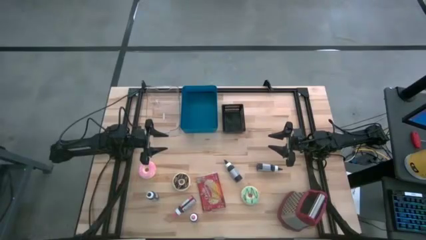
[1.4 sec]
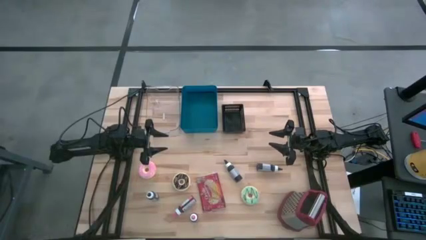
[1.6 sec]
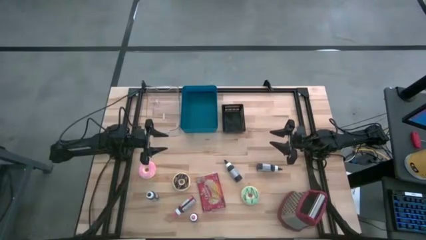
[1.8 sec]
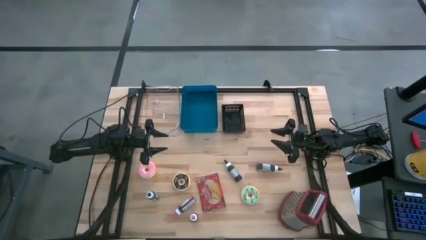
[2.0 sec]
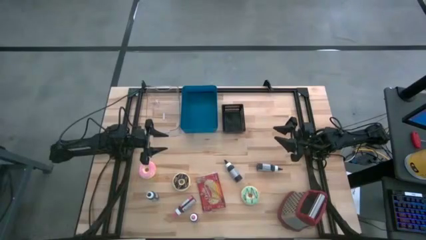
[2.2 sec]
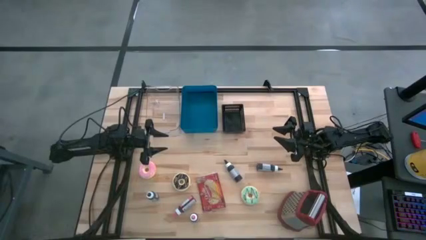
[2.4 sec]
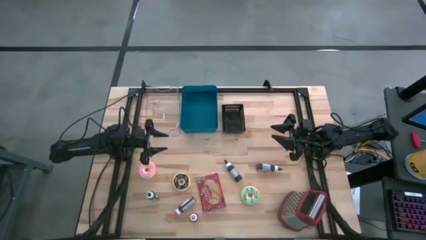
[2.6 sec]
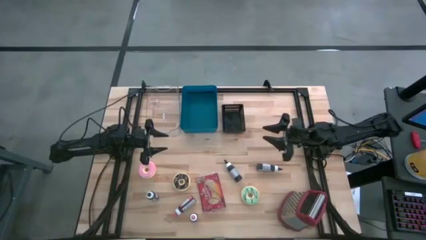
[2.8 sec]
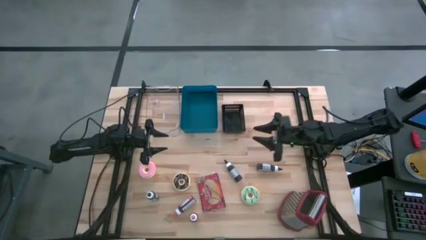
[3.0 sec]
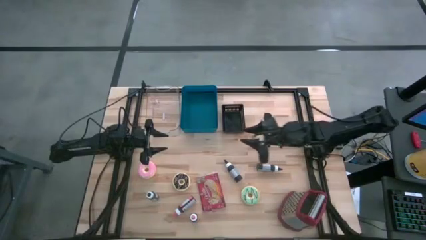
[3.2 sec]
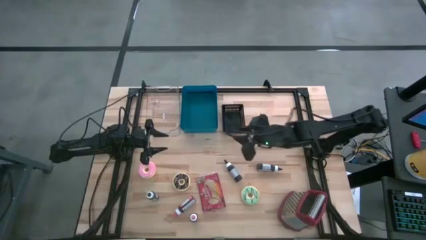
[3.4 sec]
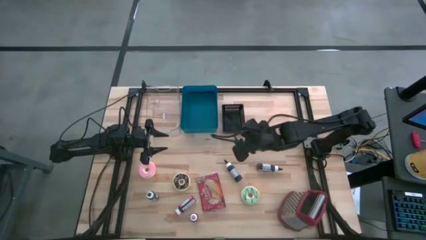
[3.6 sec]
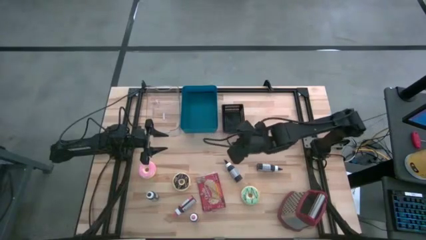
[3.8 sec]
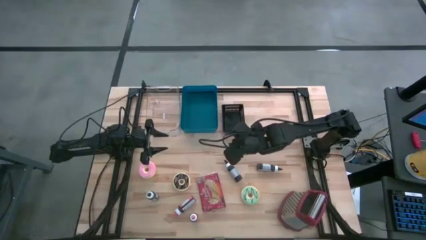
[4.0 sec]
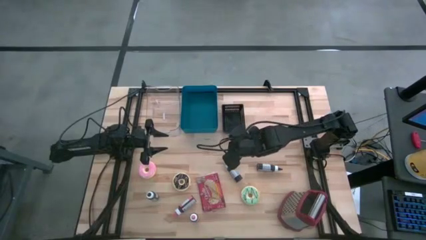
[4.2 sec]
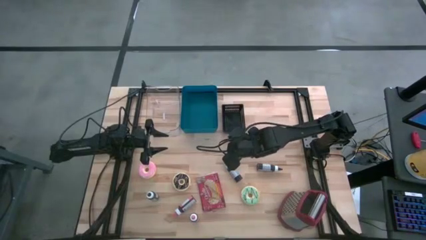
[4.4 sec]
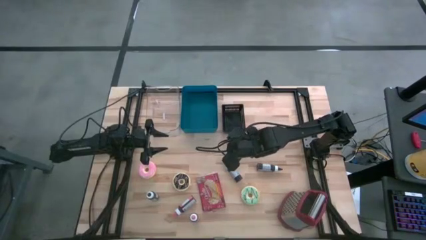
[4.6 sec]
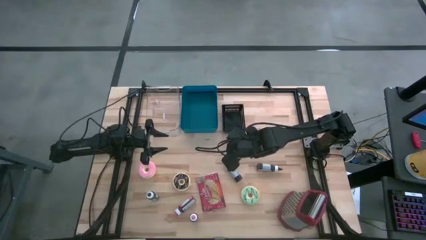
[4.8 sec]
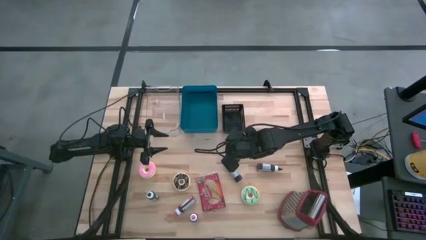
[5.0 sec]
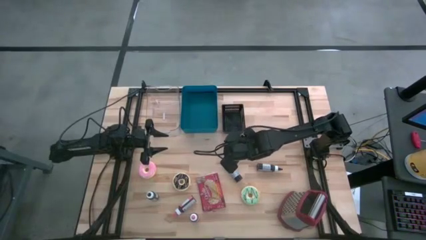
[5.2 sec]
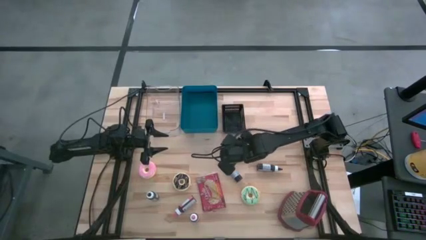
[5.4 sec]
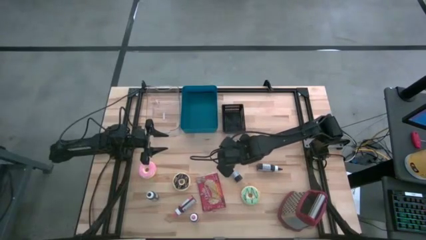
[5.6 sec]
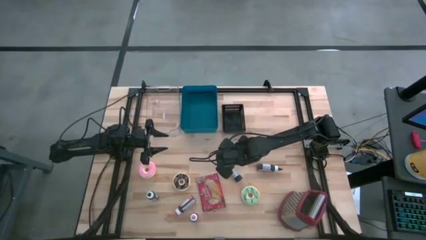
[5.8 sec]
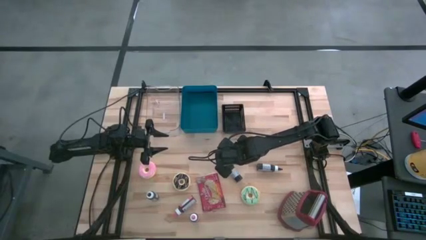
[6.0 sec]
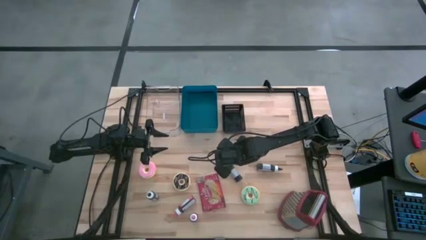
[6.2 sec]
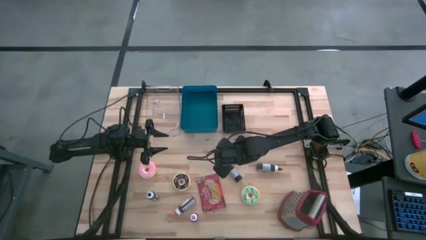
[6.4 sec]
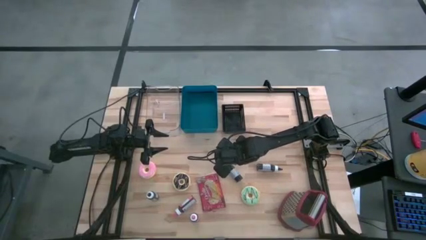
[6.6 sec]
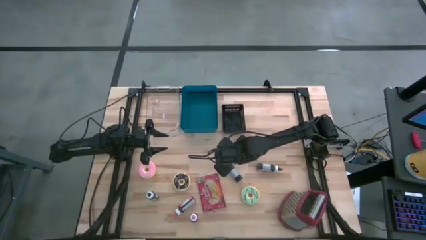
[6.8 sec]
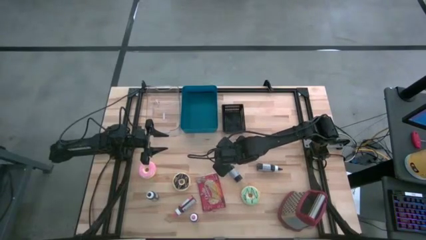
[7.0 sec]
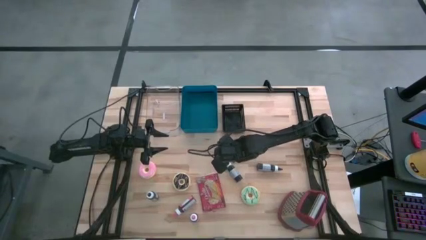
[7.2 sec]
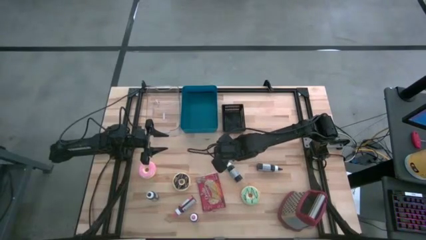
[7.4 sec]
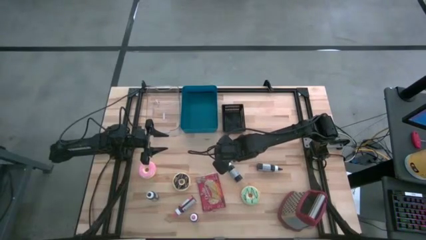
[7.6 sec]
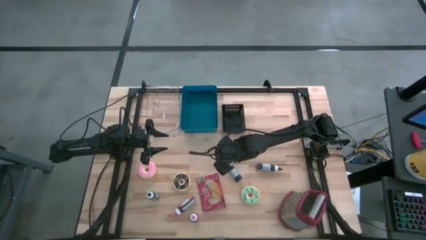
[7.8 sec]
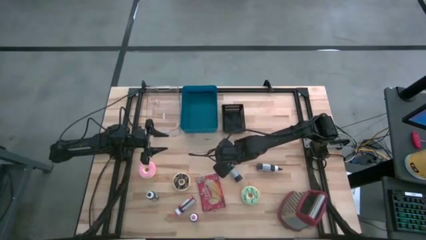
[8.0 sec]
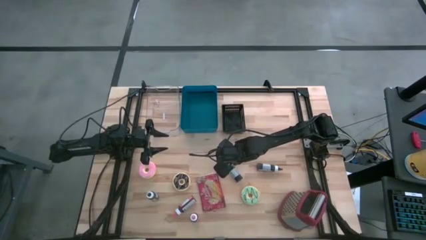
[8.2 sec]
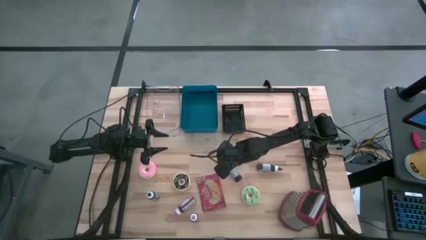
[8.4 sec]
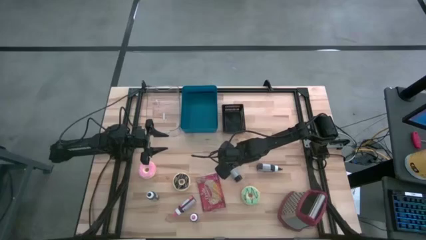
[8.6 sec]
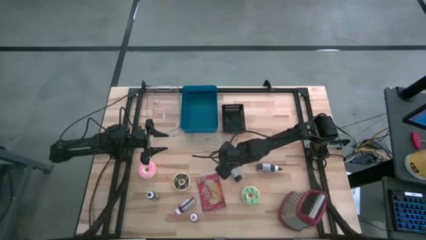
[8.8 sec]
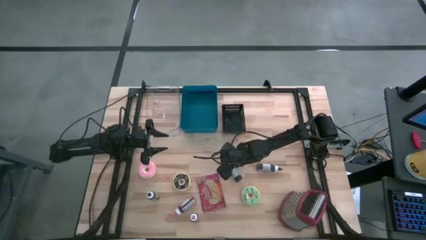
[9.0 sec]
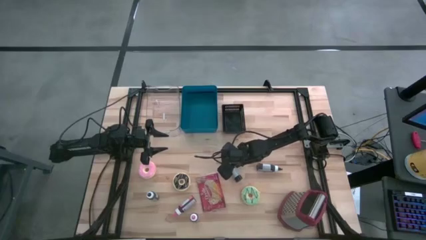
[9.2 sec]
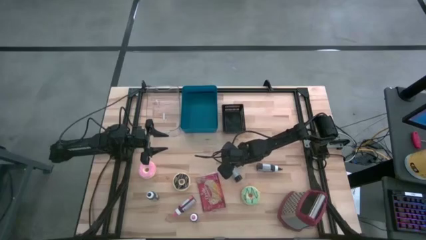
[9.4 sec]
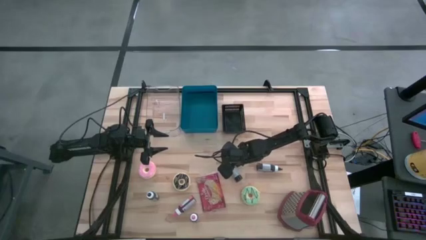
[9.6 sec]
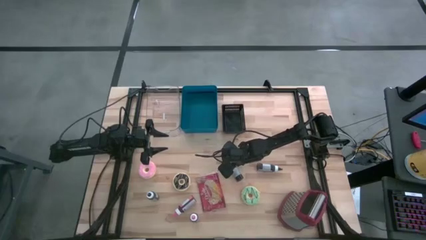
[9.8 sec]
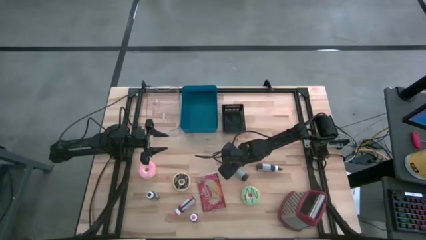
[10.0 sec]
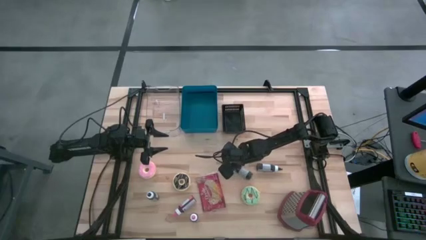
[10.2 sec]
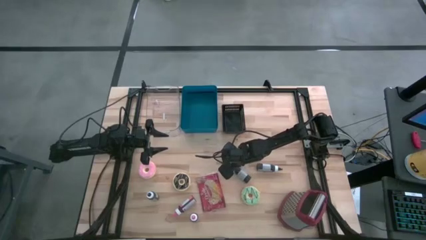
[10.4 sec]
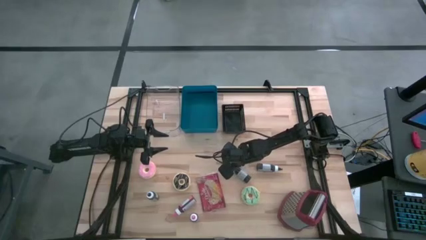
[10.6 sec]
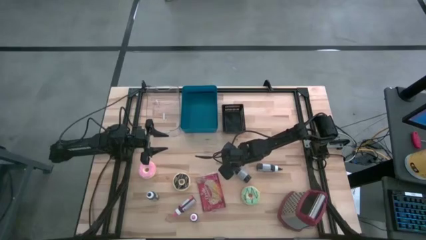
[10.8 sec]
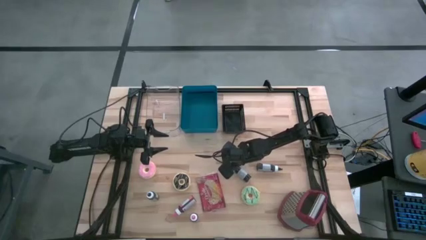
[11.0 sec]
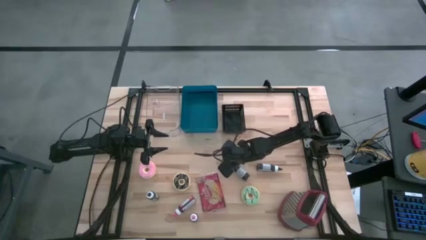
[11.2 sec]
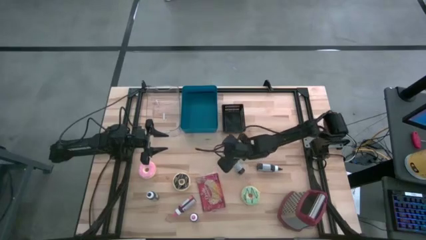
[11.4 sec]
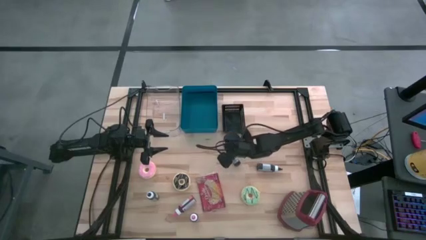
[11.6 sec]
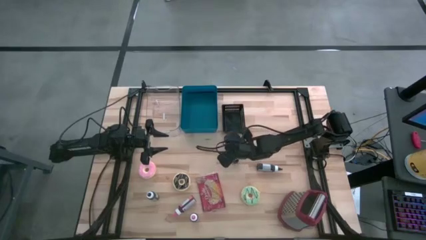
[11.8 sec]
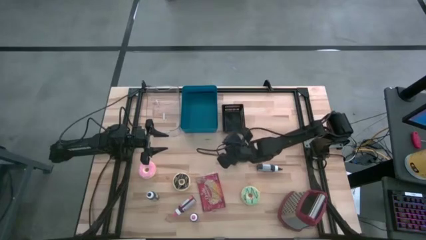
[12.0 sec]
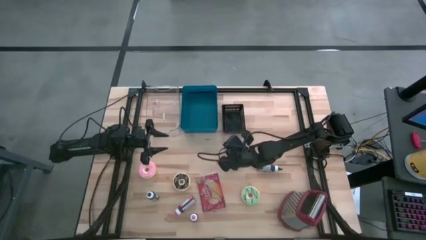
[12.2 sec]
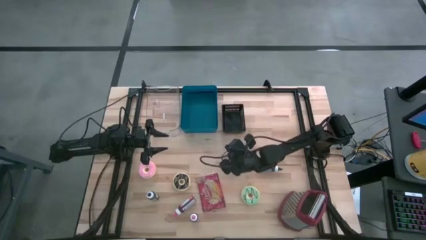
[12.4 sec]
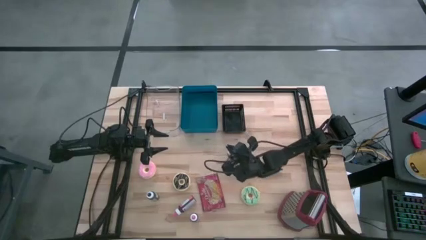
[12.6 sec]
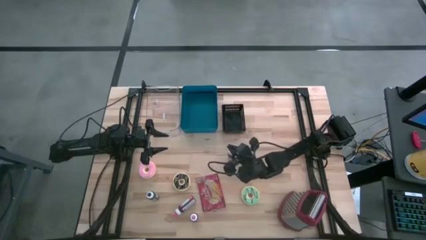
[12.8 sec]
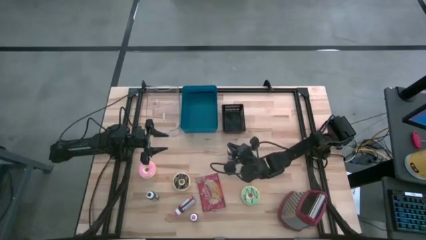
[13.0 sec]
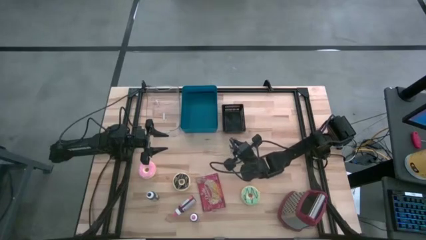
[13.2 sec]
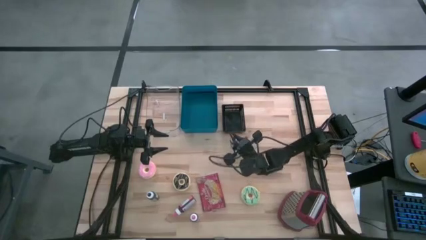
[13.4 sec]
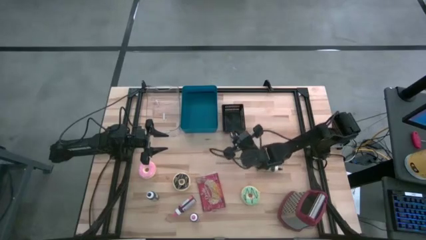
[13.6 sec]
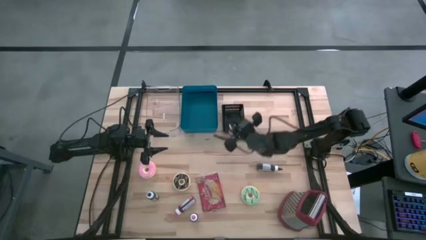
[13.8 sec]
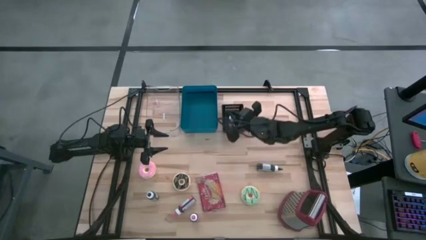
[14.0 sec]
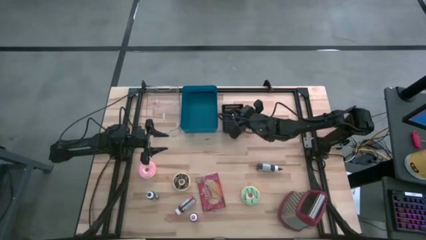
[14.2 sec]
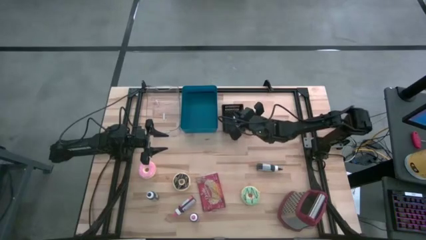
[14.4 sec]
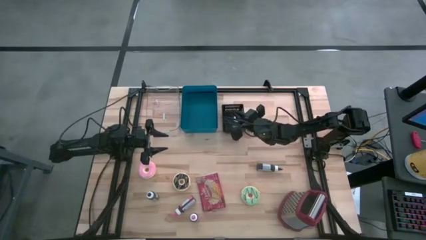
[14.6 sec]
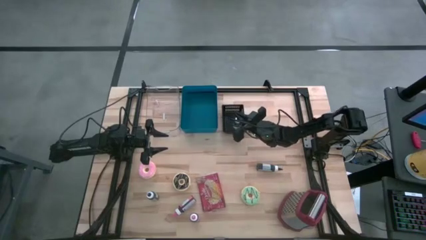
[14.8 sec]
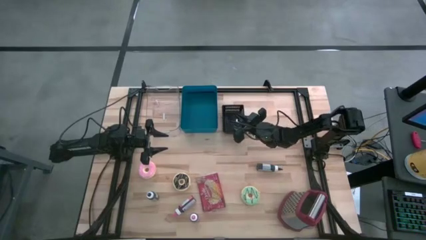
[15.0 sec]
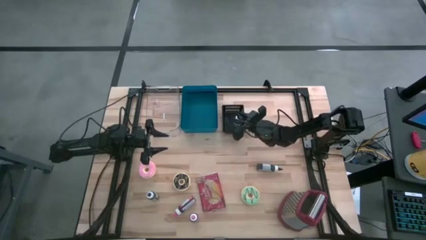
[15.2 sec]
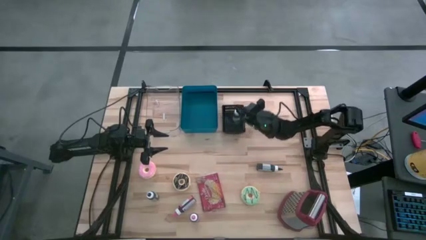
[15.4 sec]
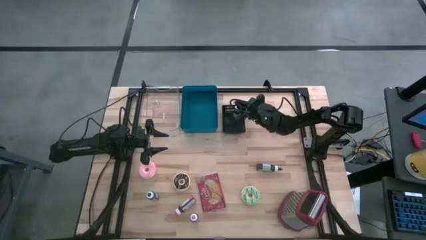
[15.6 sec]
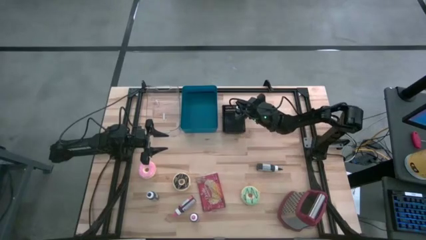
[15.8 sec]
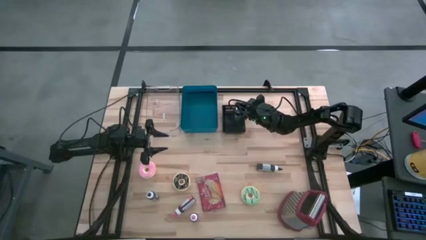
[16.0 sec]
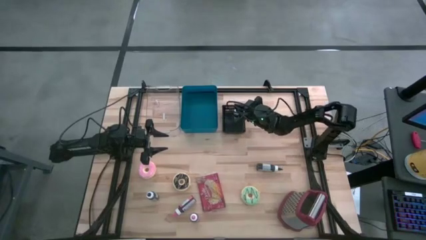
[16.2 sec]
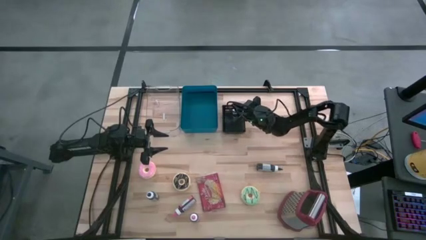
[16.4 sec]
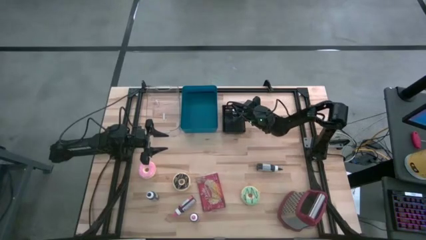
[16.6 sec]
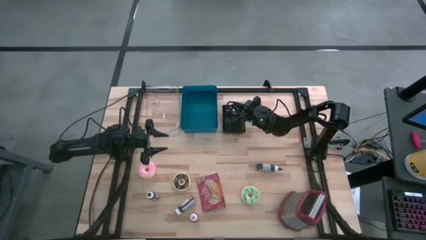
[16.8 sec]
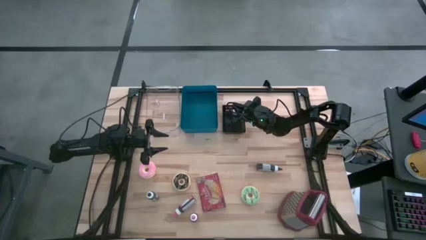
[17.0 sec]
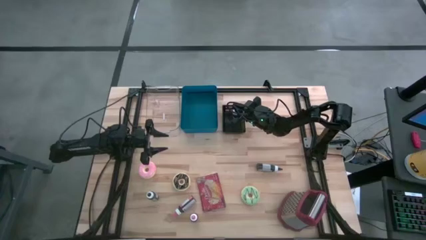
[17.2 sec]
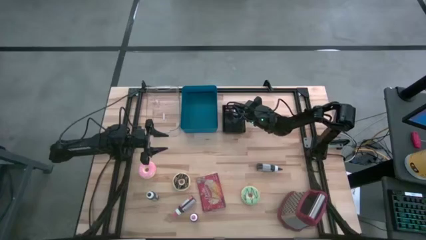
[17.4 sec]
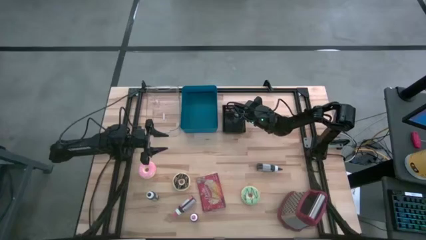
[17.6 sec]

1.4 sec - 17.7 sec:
Put the middle black food coloring into the black bin
